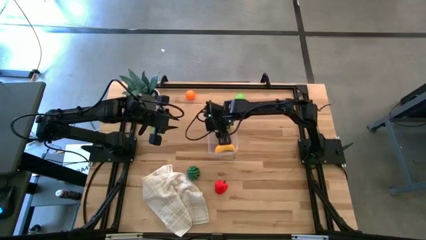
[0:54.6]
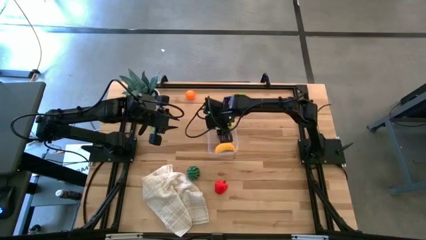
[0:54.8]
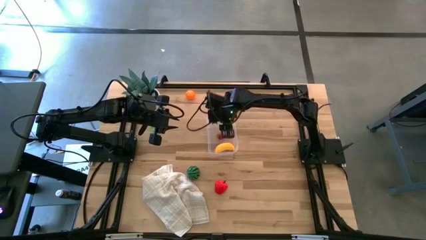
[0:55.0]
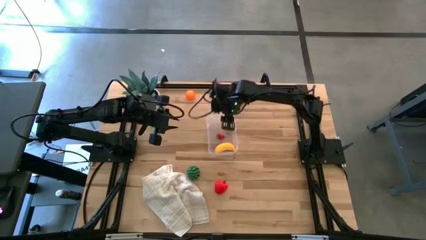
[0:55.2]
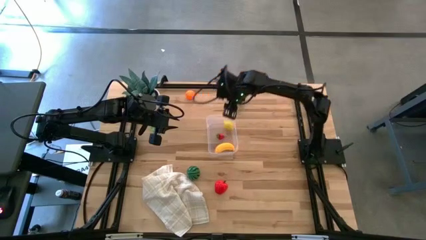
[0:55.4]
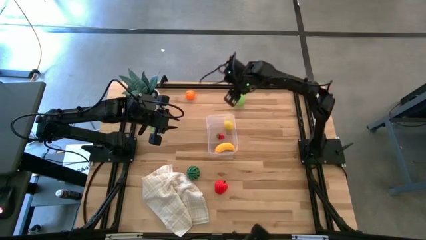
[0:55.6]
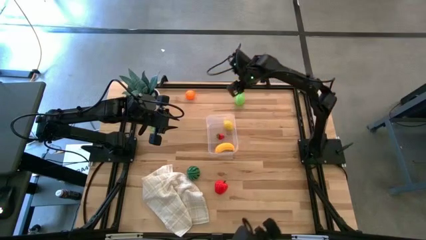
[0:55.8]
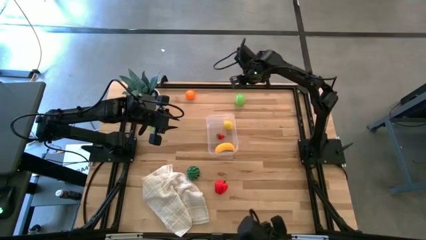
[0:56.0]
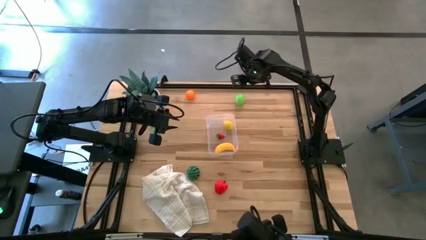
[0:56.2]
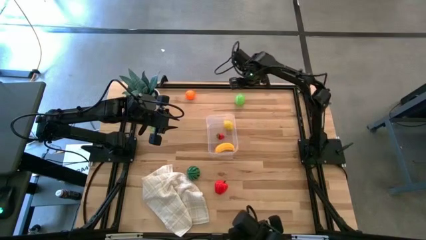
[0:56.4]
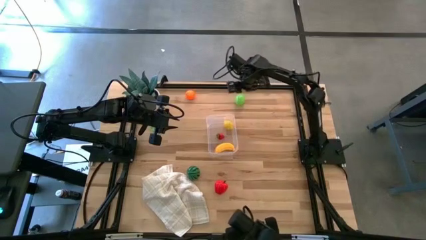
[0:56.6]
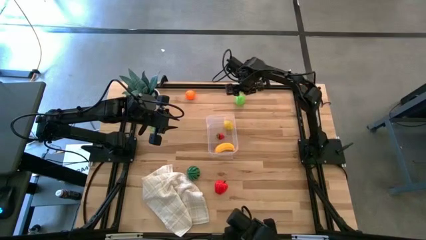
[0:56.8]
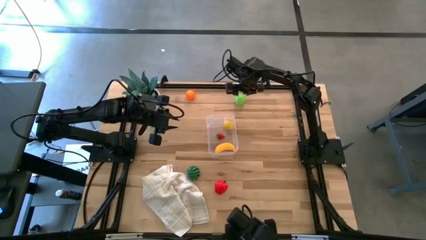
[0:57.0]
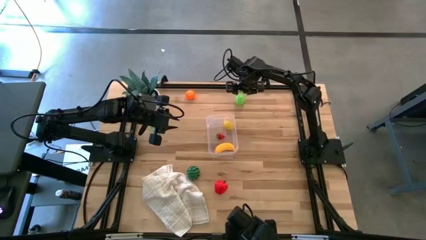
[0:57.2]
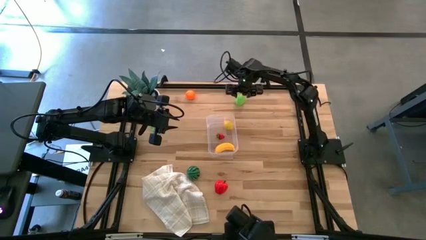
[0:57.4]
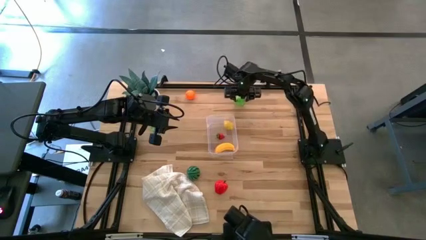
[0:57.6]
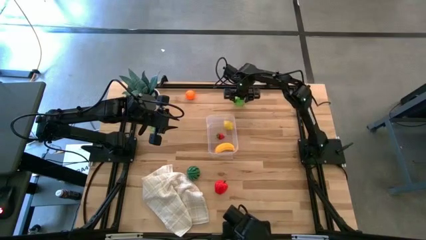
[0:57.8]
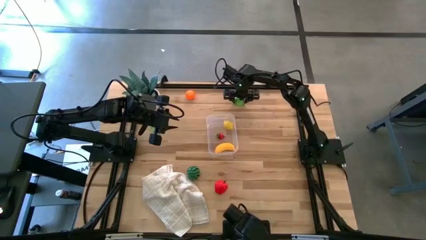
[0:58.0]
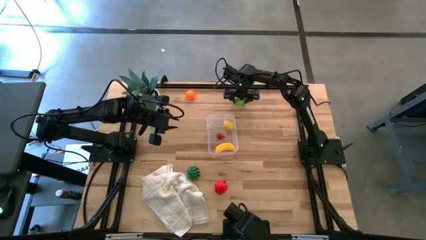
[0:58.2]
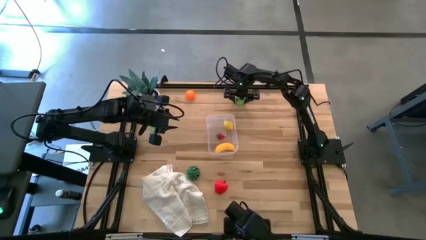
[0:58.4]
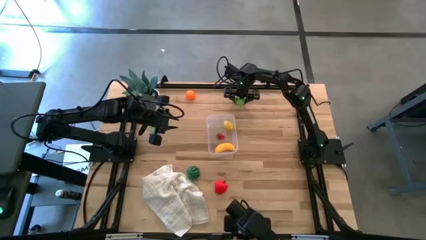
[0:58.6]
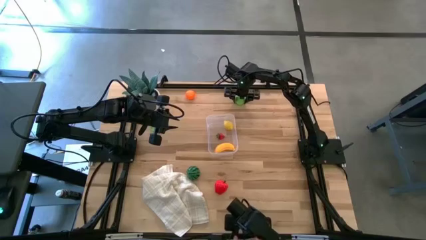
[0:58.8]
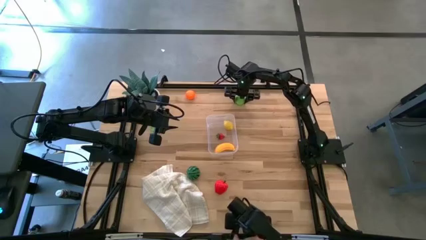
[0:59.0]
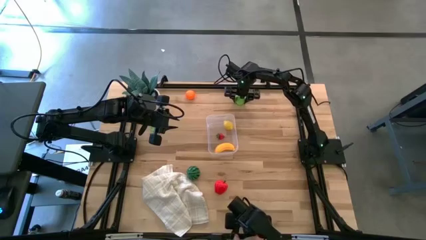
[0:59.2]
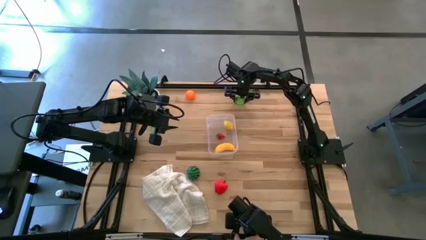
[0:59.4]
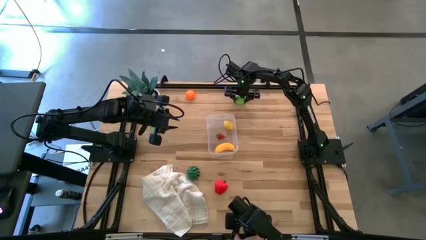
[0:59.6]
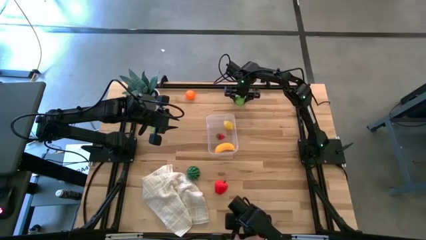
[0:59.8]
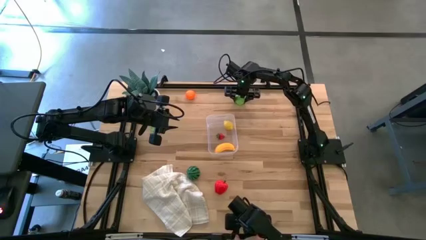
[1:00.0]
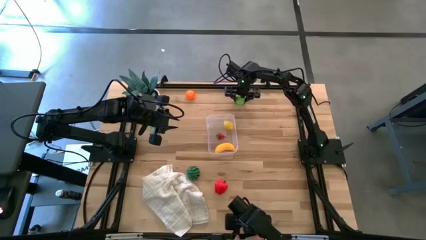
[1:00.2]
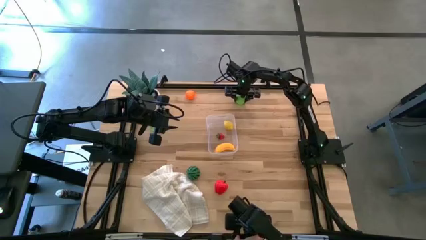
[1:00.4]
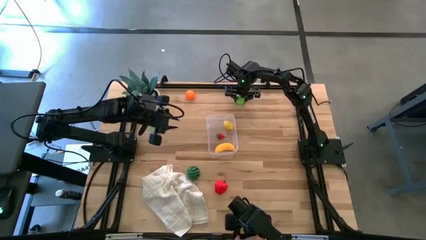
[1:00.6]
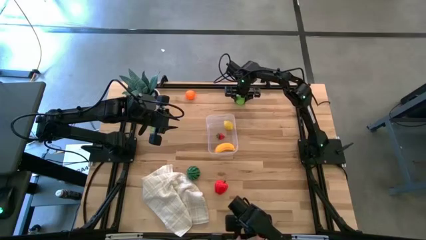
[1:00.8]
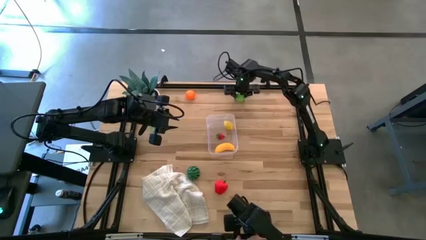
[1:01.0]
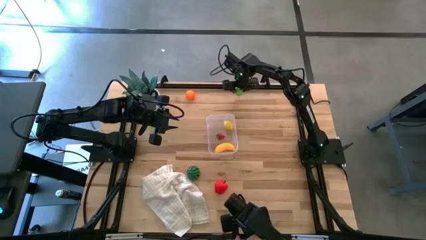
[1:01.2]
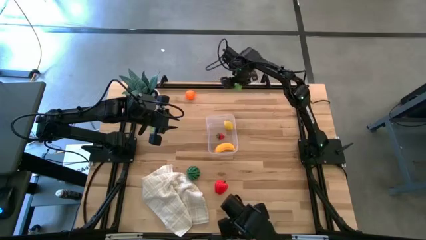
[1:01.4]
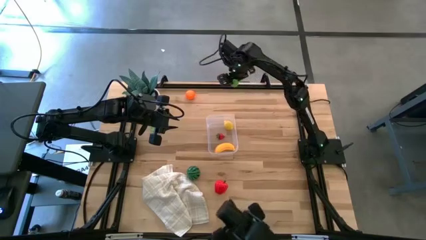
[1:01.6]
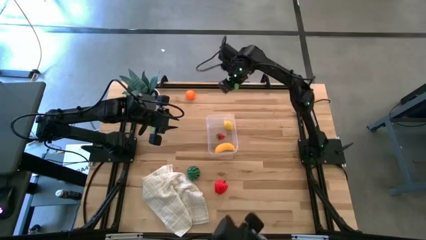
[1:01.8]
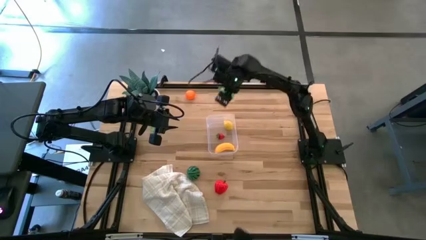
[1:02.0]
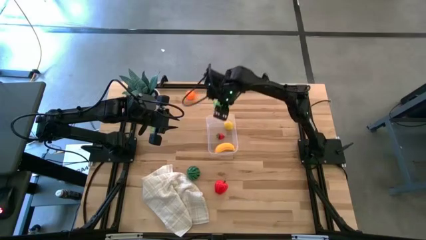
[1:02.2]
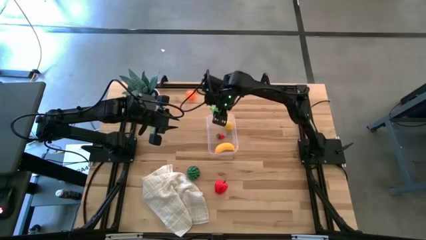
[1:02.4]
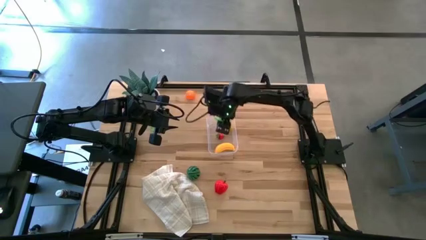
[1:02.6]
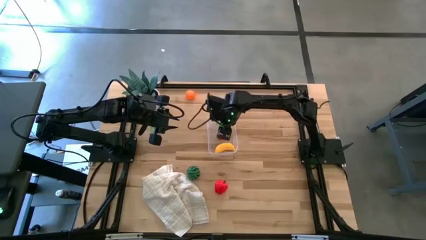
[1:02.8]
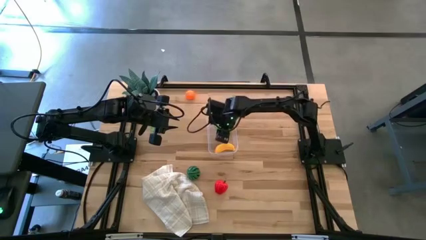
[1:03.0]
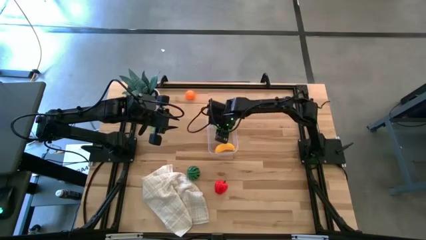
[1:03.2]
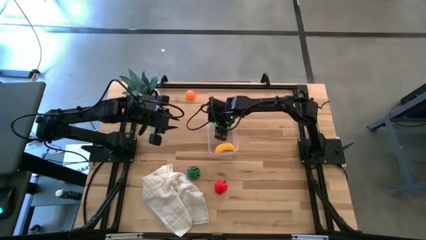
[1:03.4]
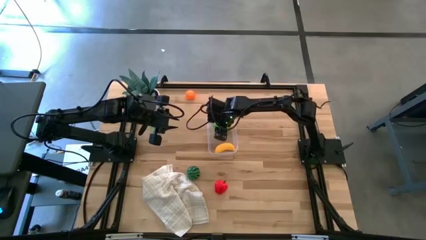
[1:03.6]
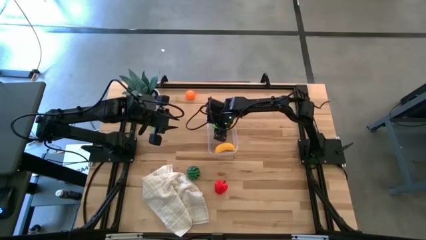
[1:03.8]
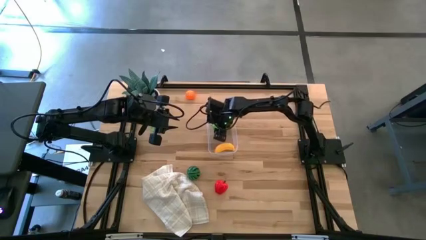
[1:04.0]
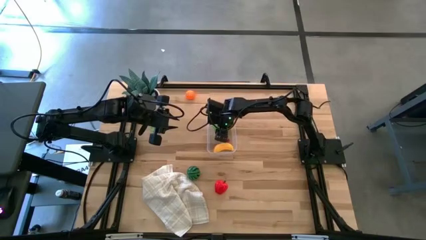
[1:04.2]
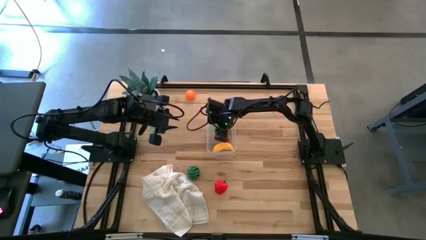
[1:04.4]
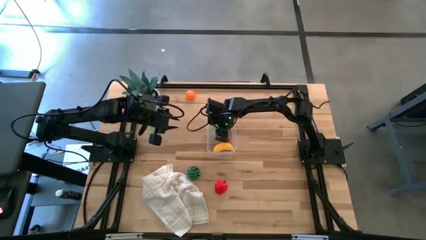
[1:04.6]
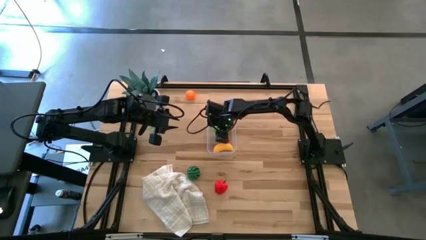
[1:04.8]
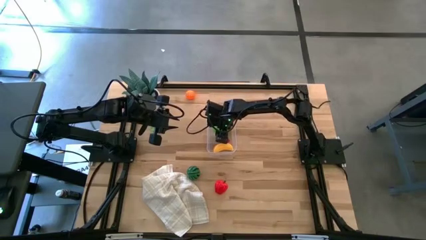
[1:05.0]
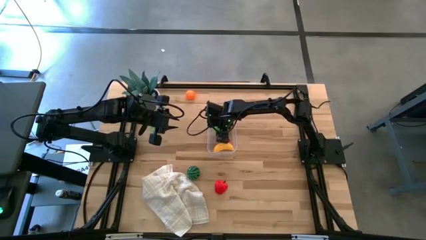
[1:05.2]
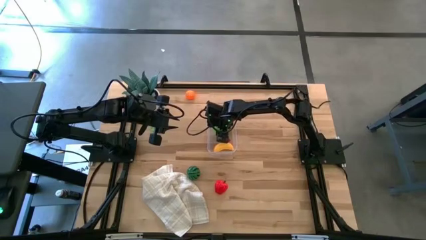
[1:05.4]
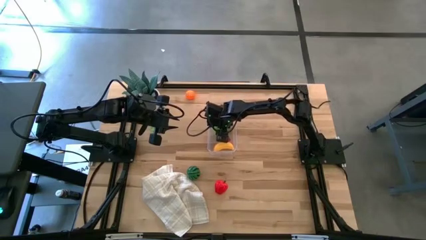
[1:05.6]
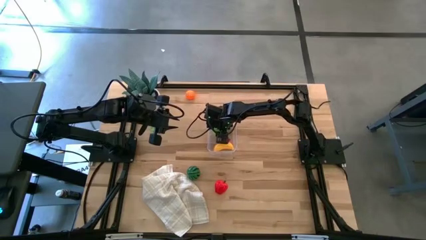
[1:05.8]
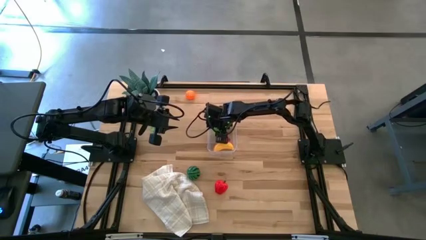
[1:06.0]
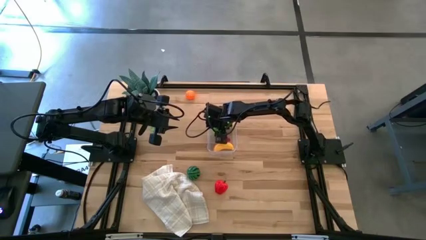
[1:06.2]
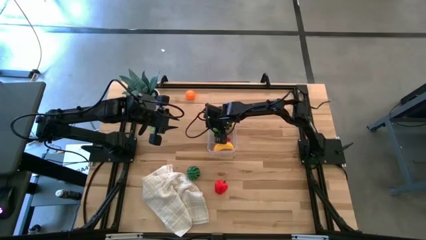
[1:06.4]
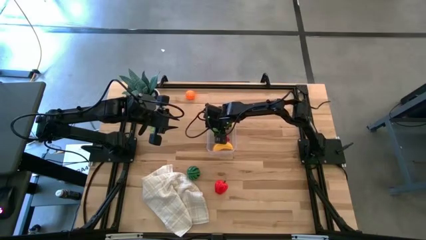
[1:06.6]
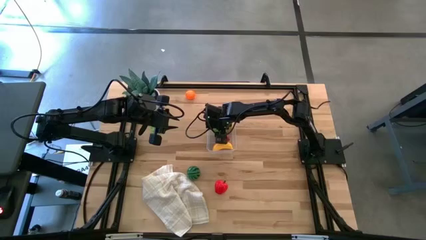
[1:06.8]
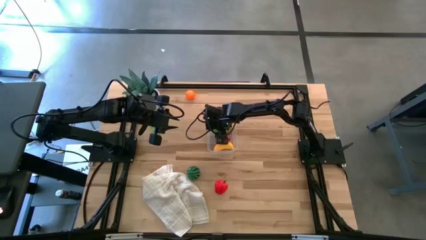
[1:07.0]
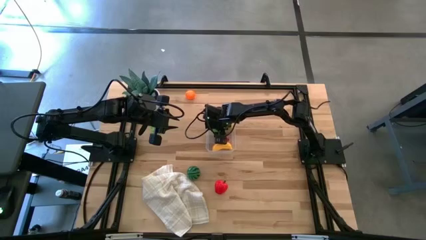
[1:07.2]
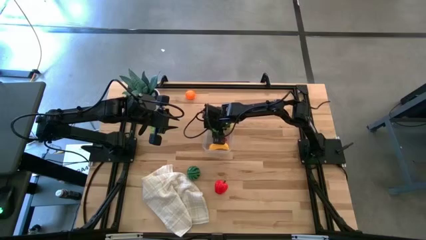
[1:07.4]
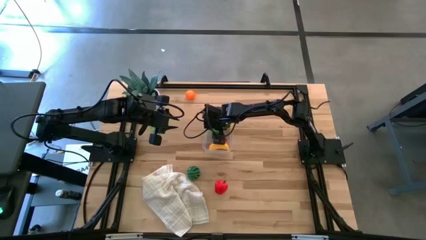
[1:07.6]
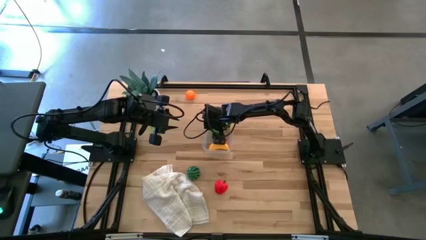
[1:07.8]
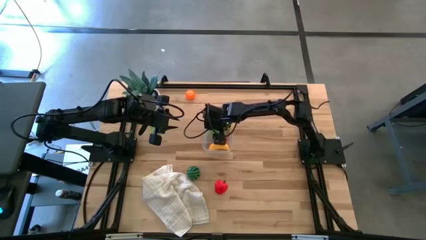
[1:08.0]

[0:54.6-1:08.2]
Task: Pick and placing Produce into tupperware
Put the green melon into the transparent bin
